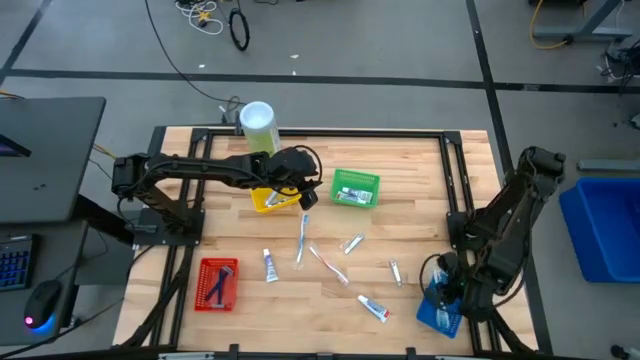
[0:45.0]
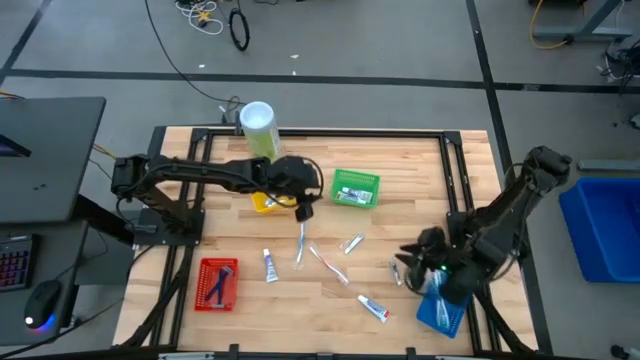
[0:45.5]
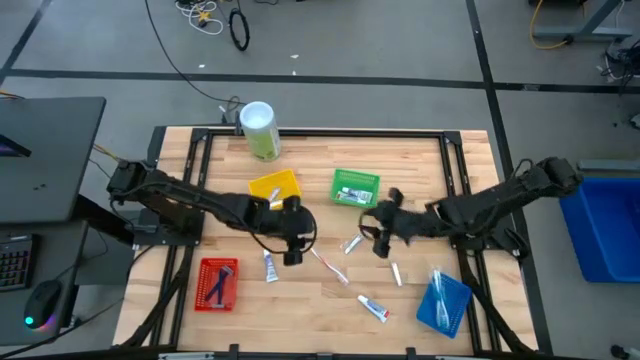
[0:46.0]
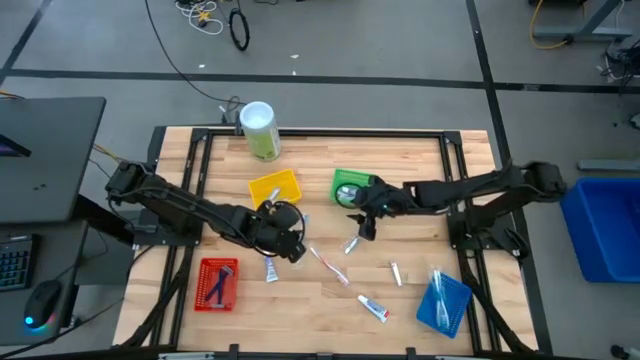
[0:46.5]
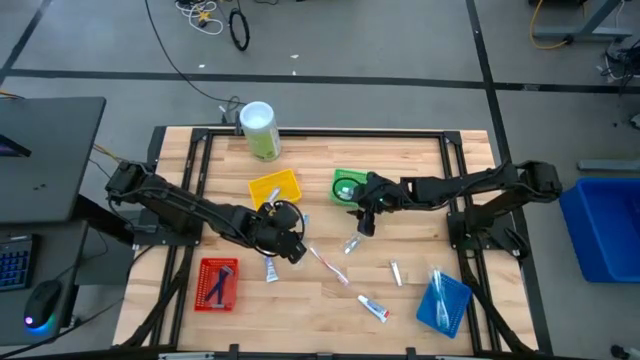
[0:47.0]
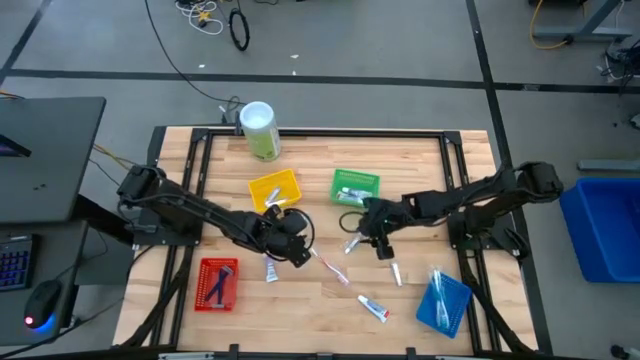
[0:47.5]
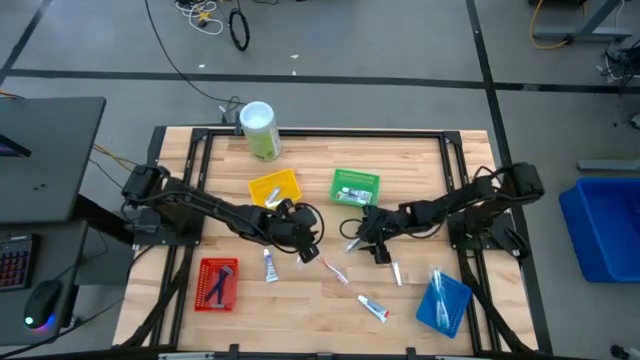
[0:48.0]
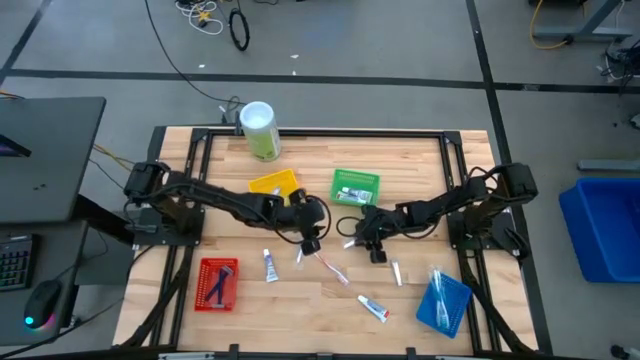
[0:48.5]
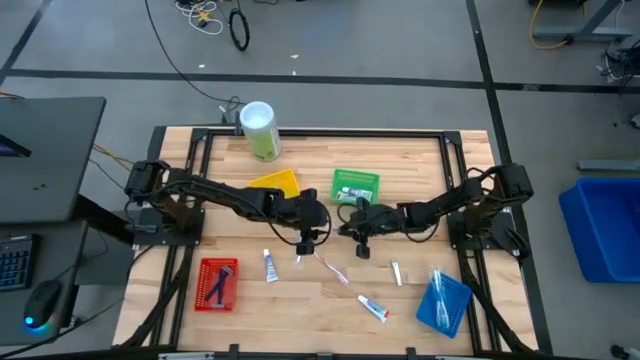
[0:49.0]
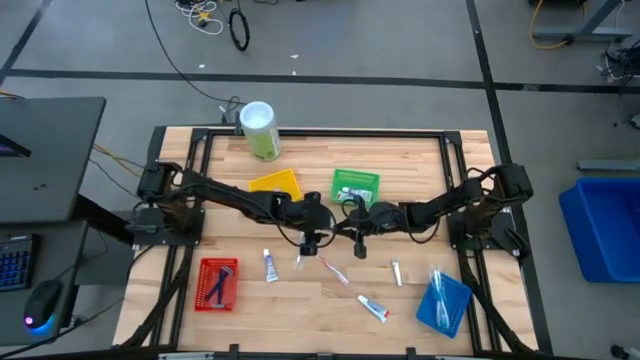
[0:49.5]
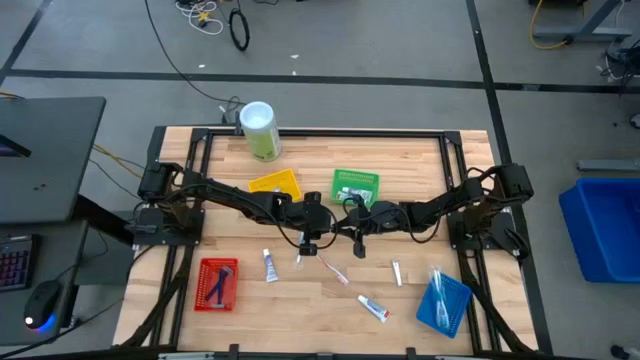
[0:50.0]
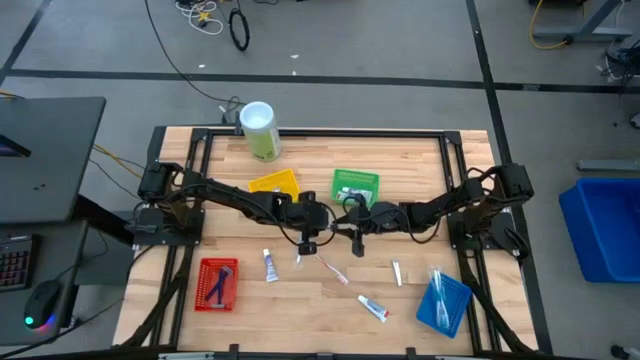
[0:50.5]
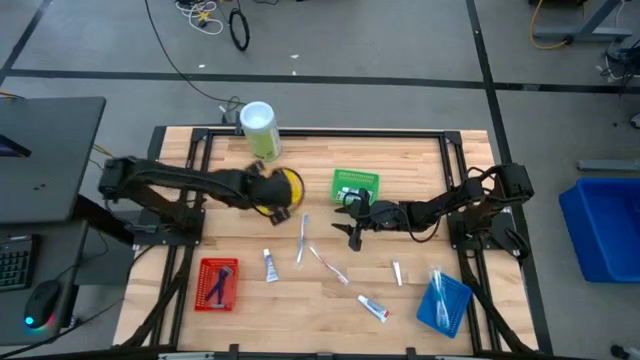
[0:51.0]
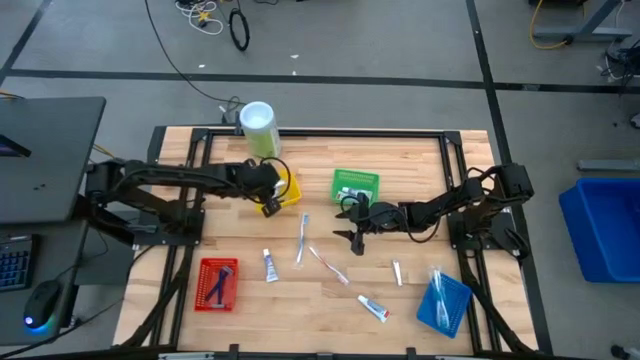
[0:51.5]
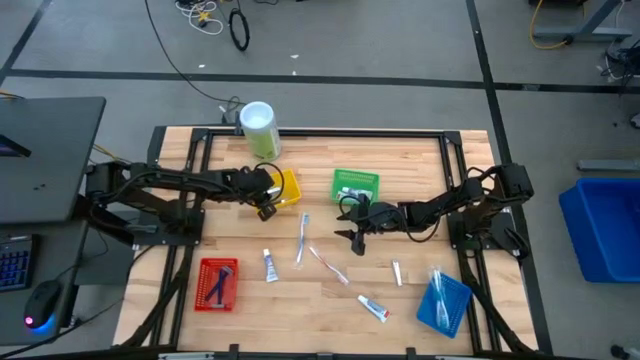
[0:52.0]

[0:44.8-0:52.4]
Task: Pick & Place Travel size toiletries
Put the silver nail cutter into the yellow bin

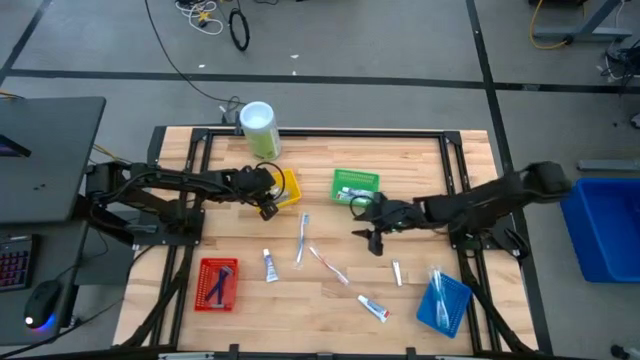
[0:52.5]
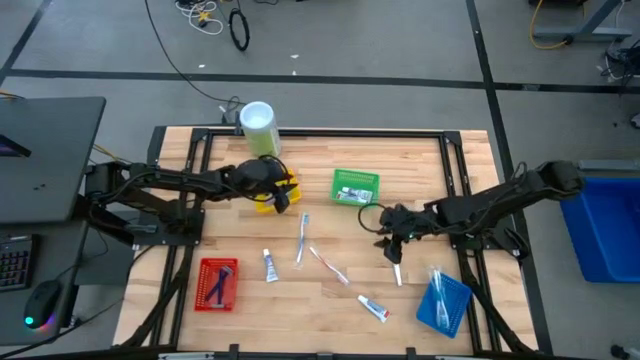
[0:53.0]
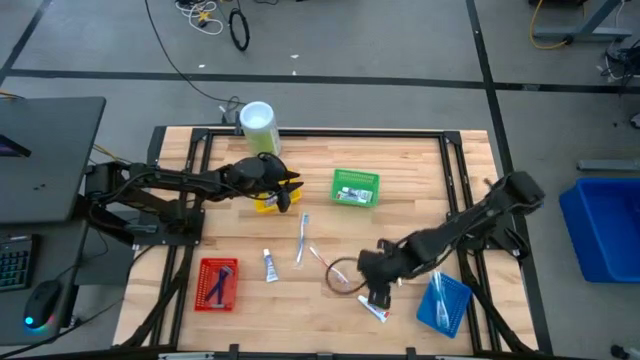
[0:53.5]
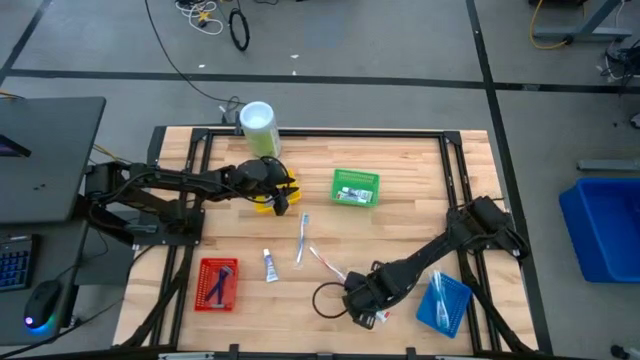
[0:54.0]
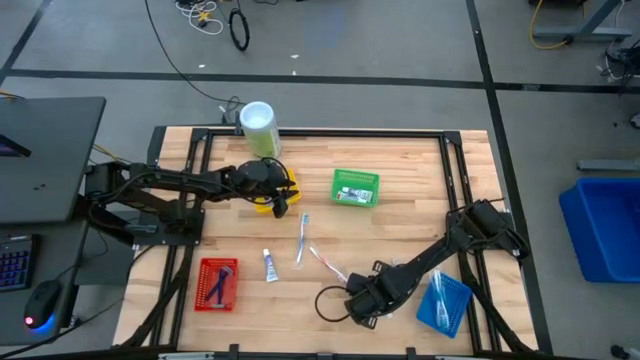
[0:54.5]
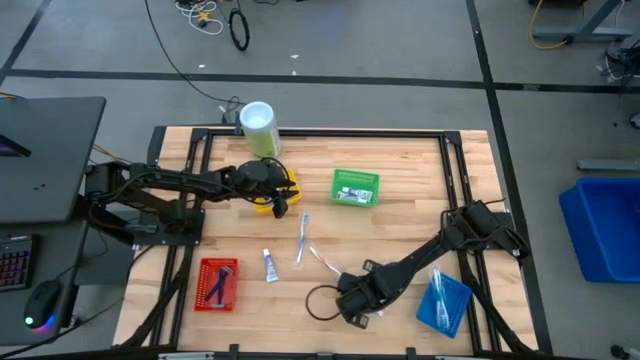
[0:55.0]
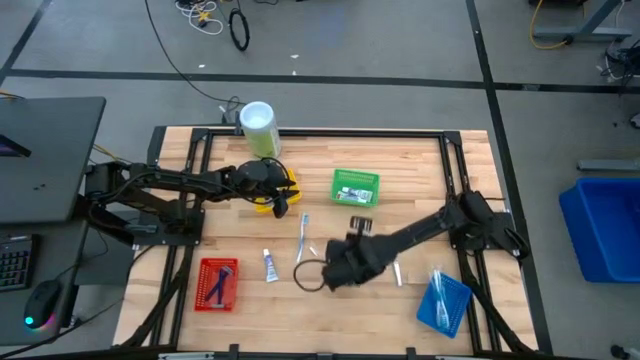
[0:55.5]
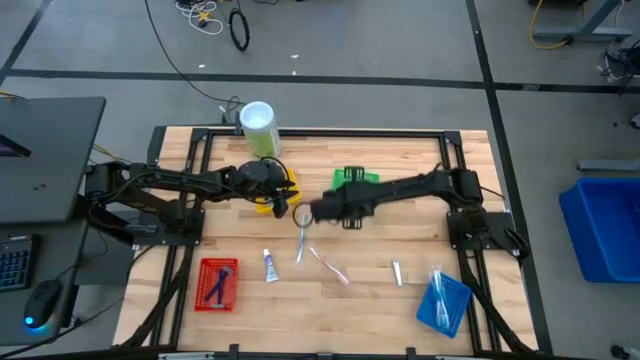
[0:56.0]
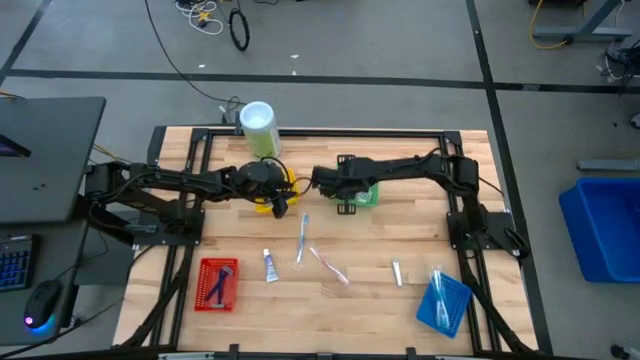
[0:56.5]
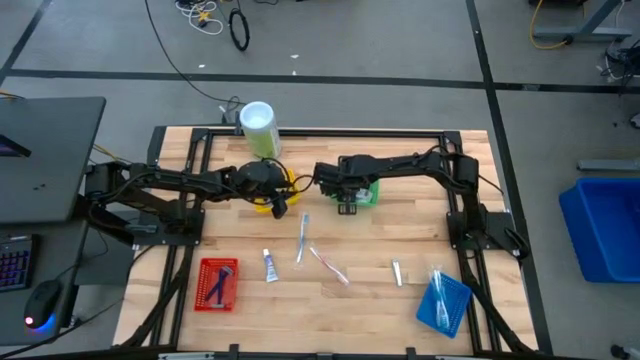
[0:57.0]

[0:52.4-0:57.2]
Put the white toothpaste into the green bin

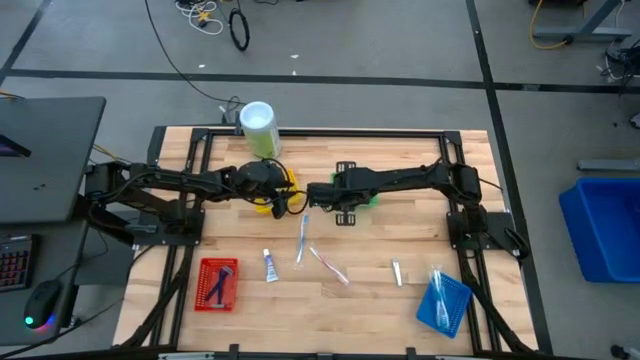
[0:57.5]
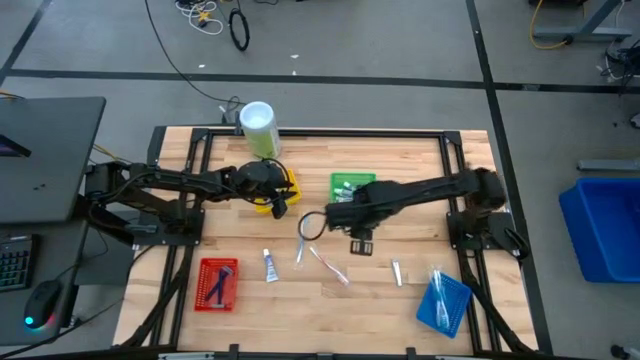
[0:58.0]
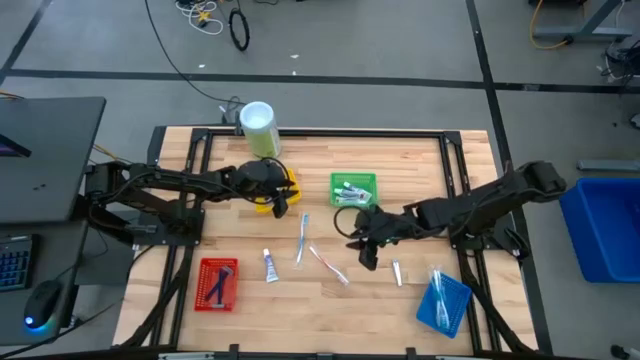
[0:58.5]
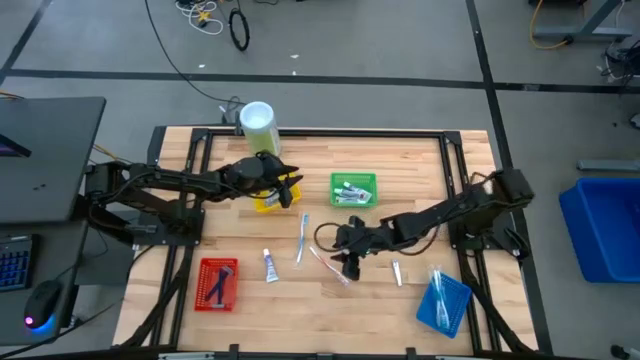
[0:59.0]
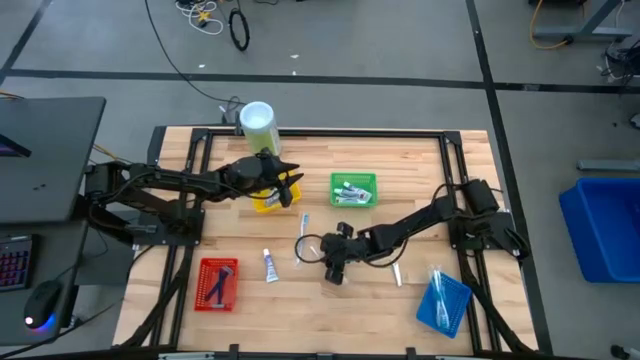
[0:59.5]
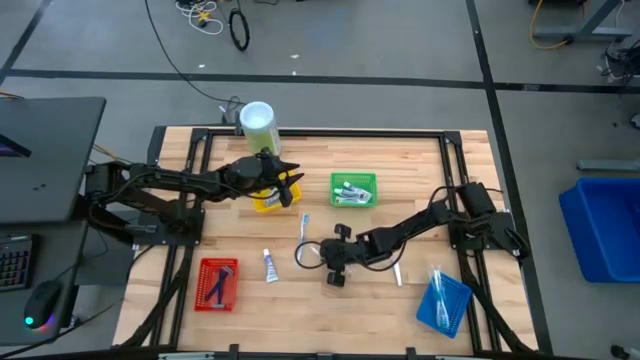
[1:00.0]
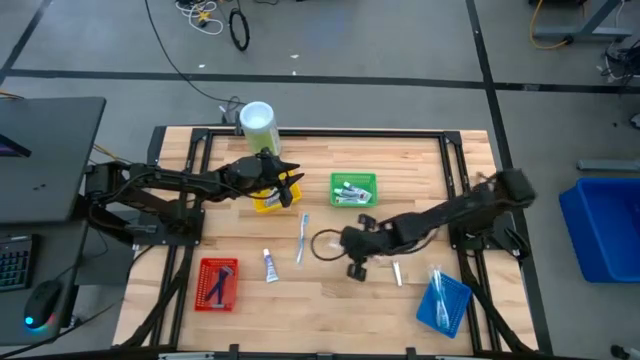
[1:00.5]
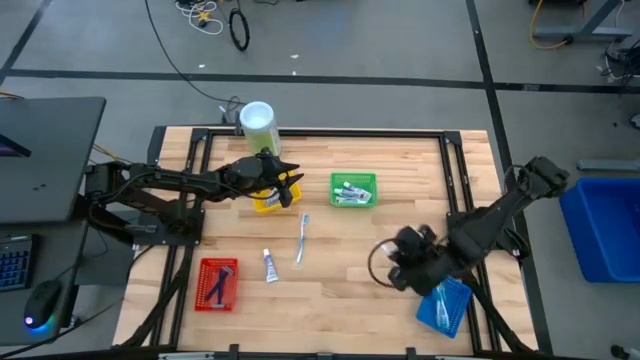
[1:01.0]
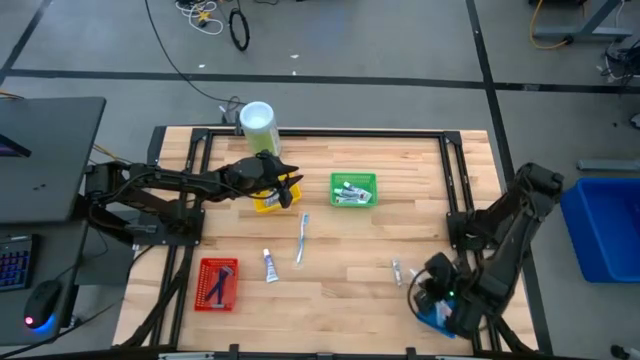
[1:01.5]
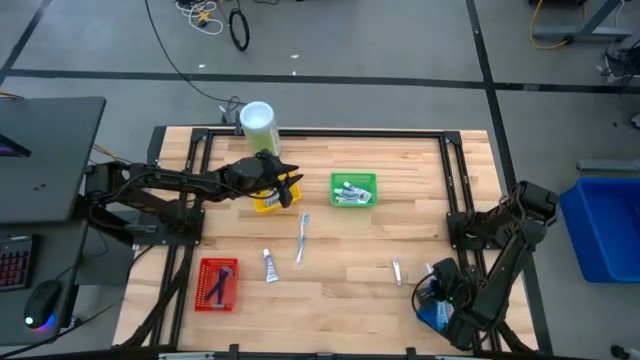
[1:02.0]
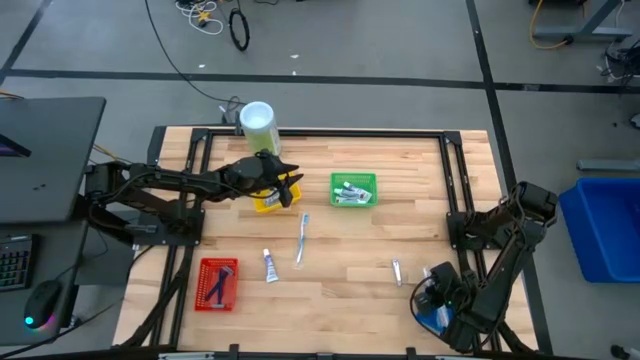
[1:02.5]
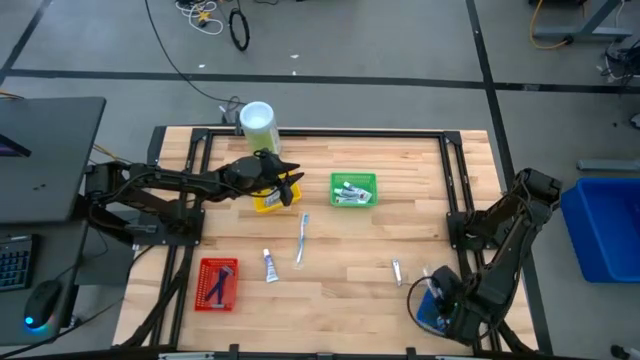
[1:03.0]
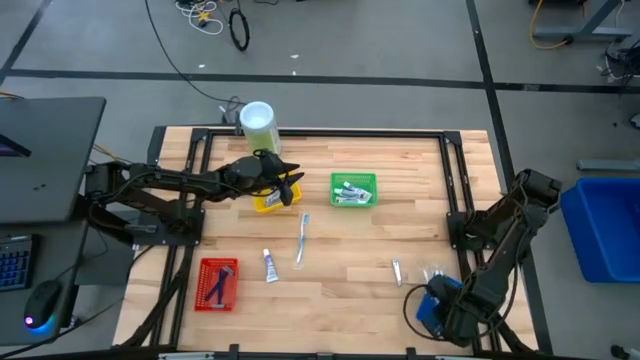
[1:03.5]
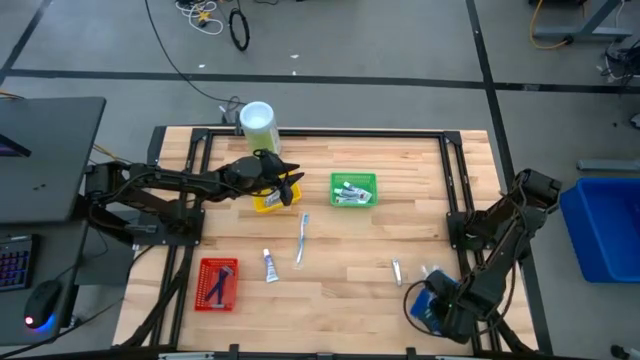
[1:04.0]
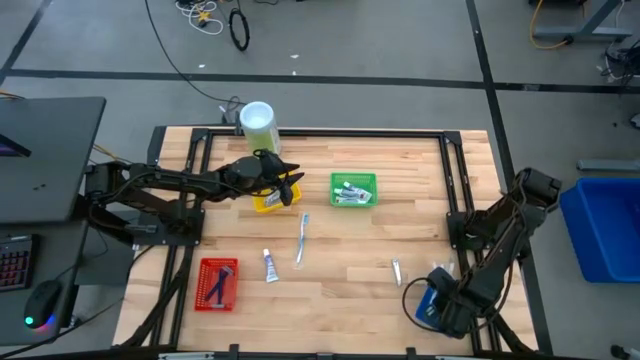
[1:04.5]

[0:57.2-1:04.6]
Put the red toothbrush into the blue bin

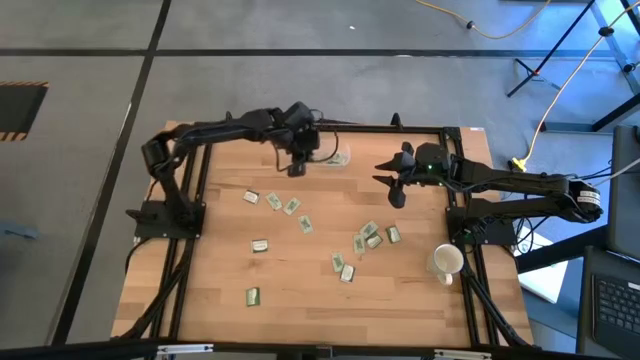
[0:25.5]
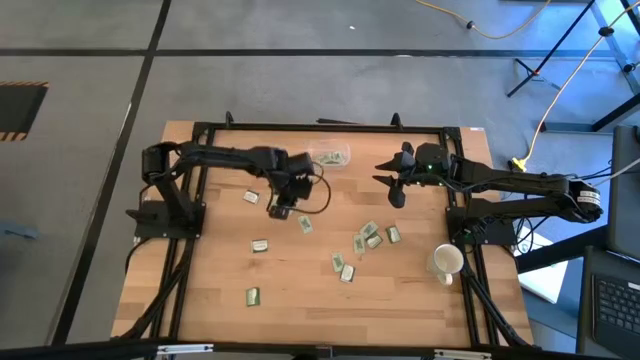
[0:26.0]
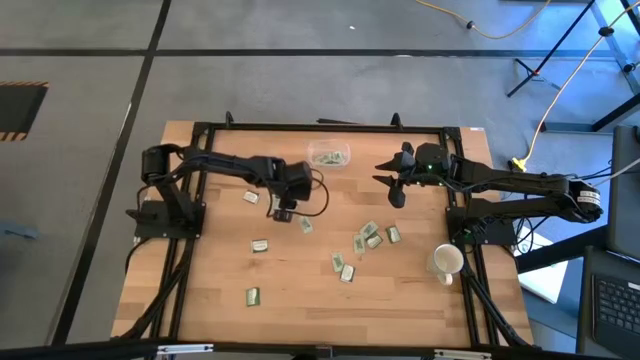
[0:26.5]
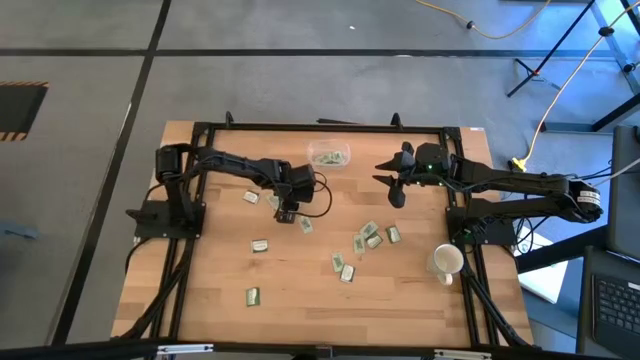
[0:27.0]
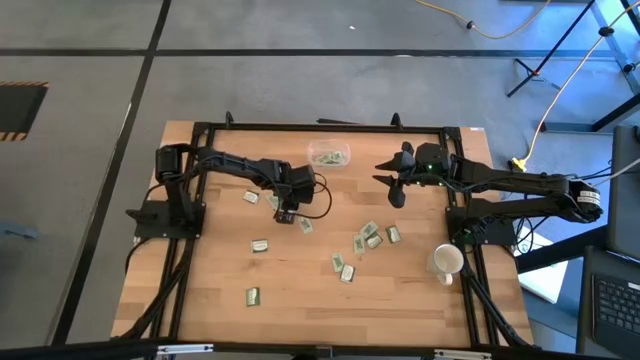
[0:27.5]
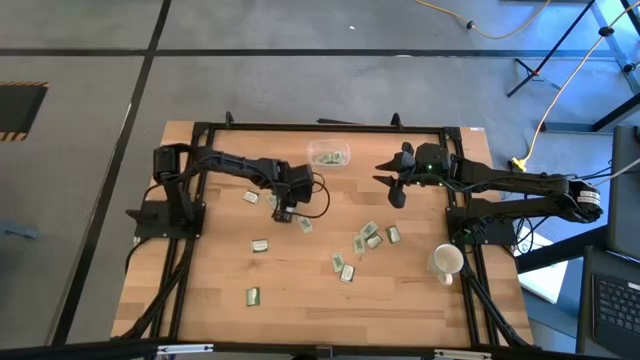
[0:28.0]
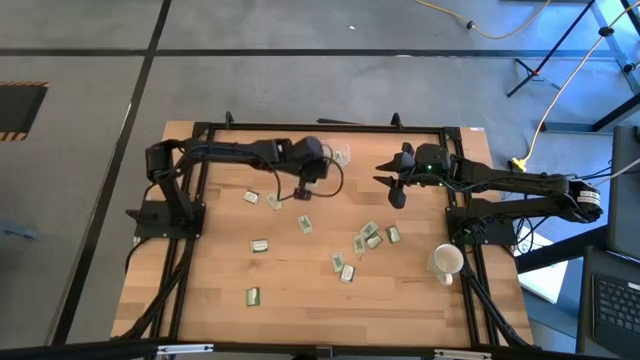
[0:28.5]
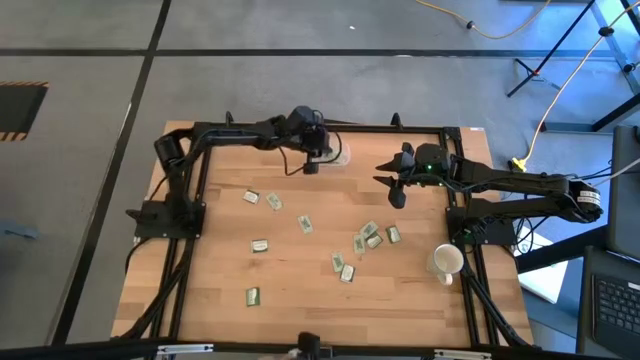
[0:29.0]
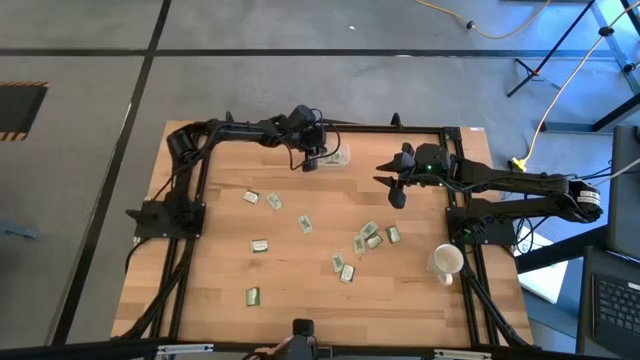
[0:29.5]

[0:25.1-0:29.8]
Task: Pick and place items into bin
Put the white stevia packet into the transparent bin
